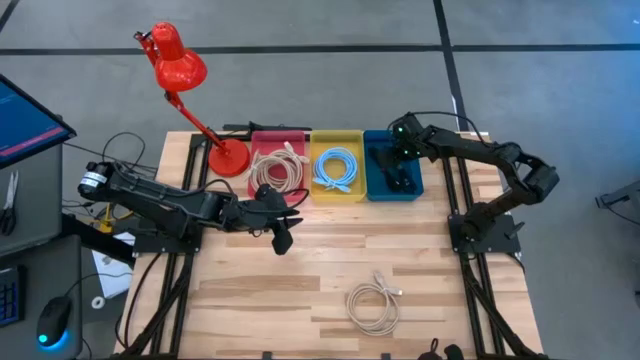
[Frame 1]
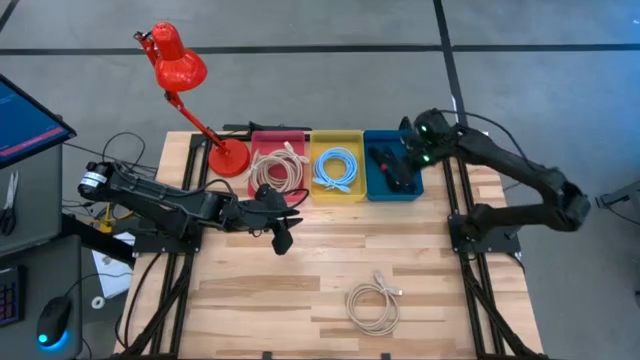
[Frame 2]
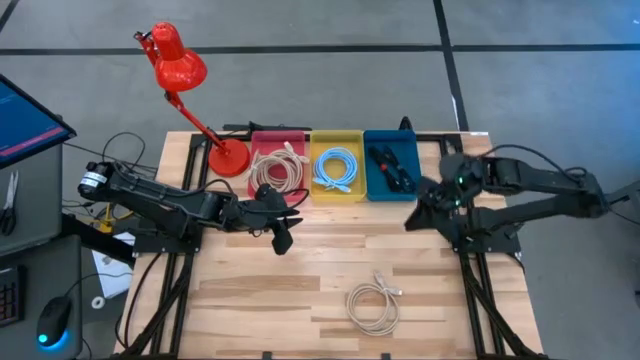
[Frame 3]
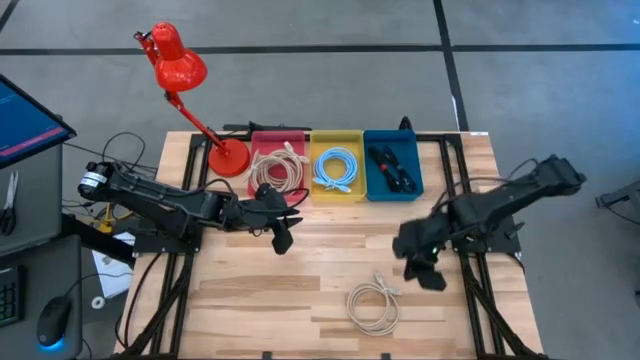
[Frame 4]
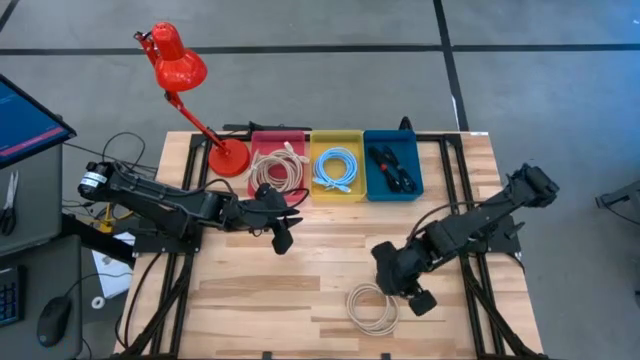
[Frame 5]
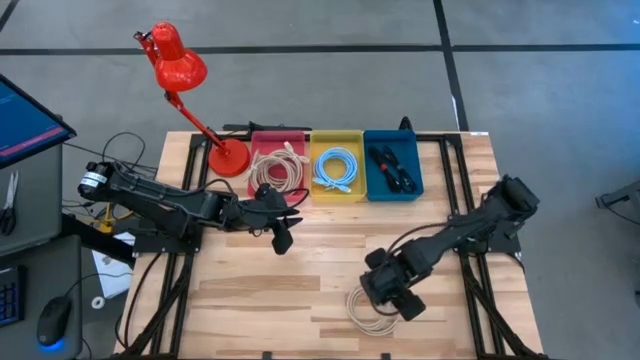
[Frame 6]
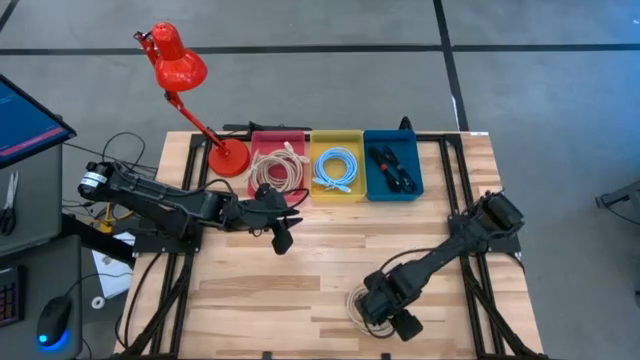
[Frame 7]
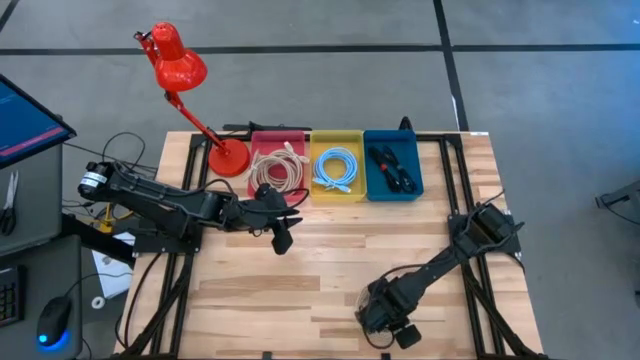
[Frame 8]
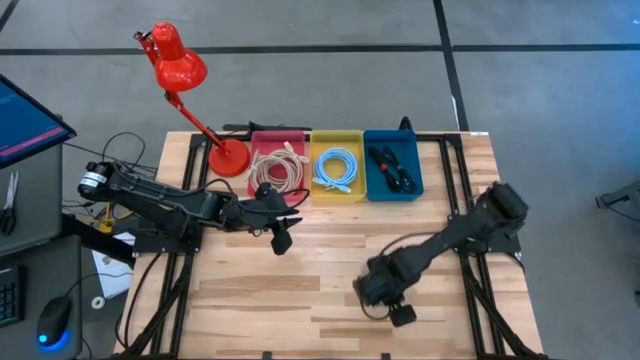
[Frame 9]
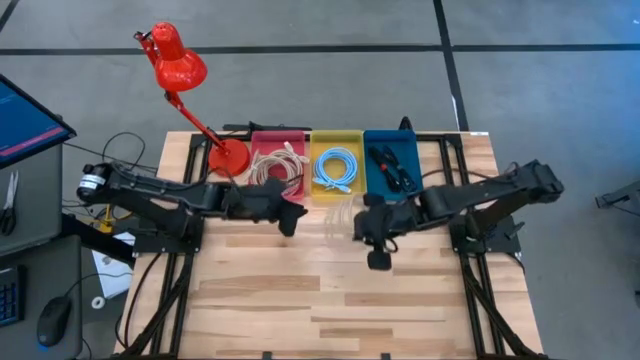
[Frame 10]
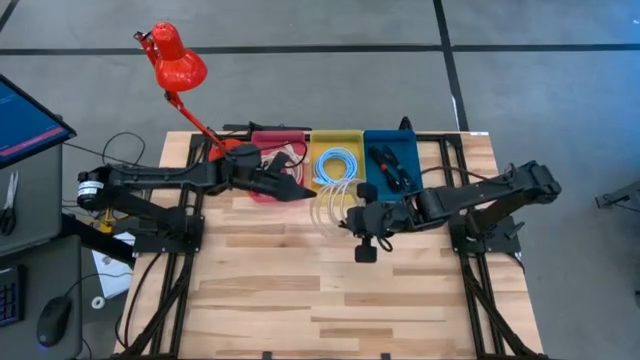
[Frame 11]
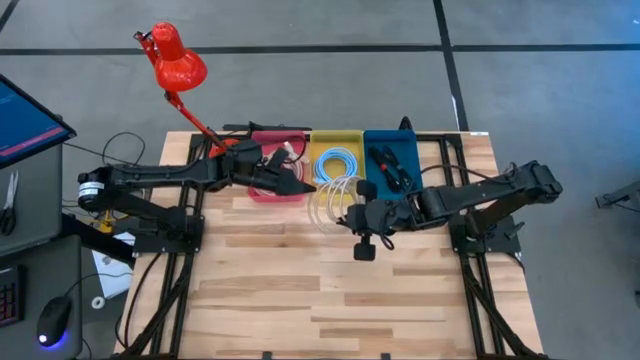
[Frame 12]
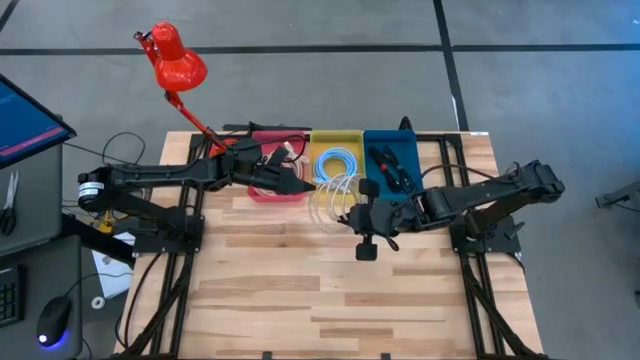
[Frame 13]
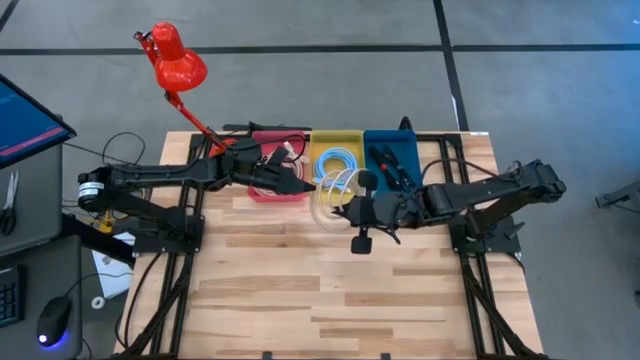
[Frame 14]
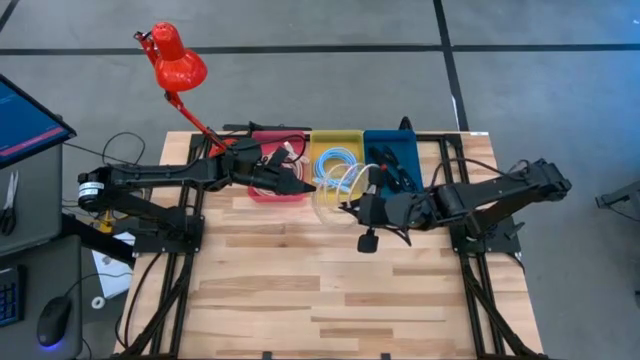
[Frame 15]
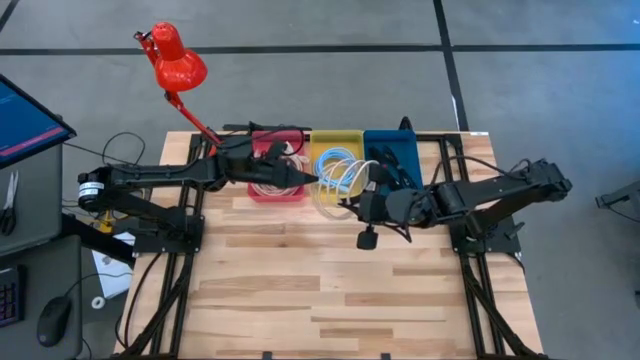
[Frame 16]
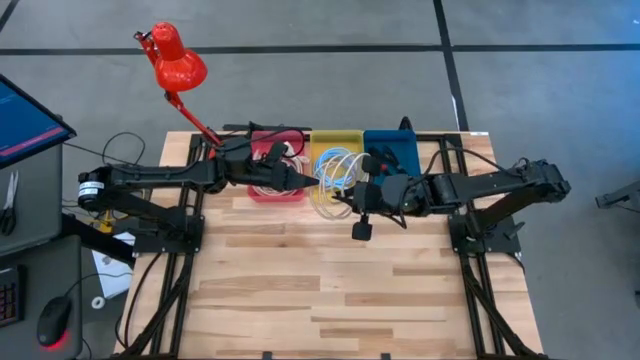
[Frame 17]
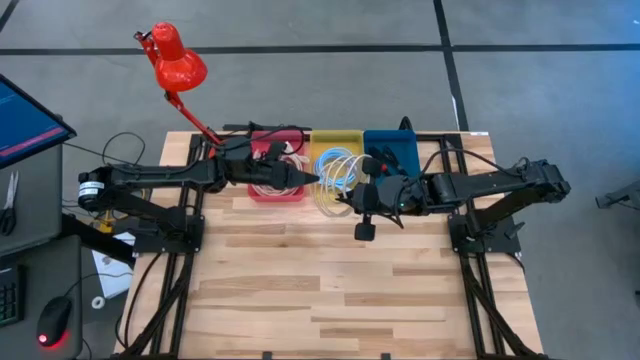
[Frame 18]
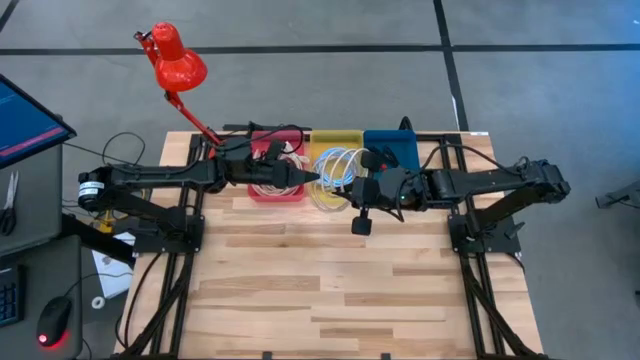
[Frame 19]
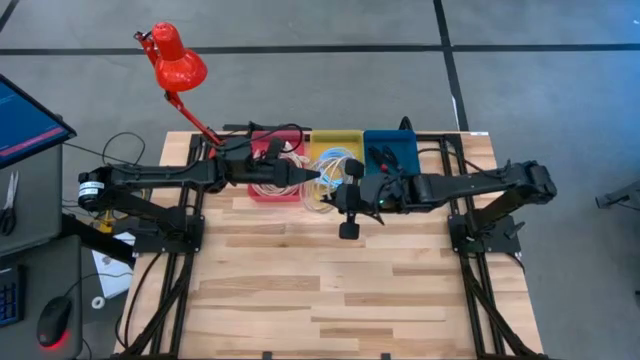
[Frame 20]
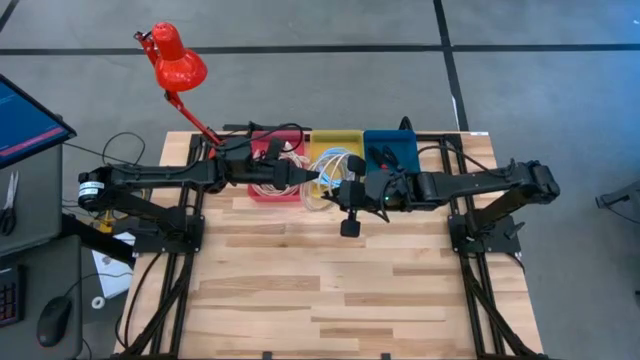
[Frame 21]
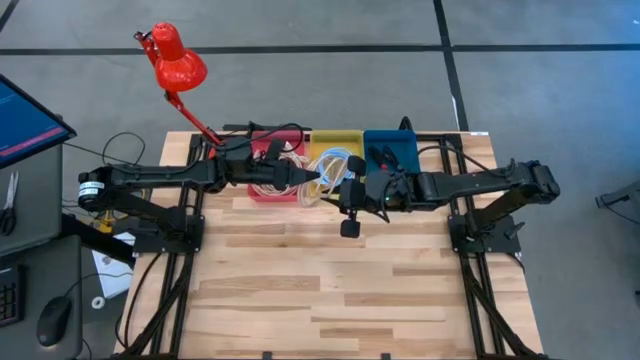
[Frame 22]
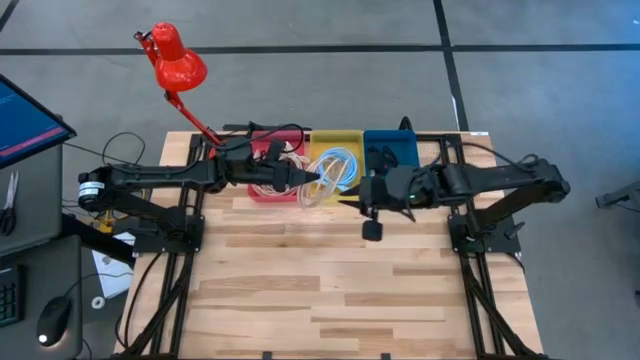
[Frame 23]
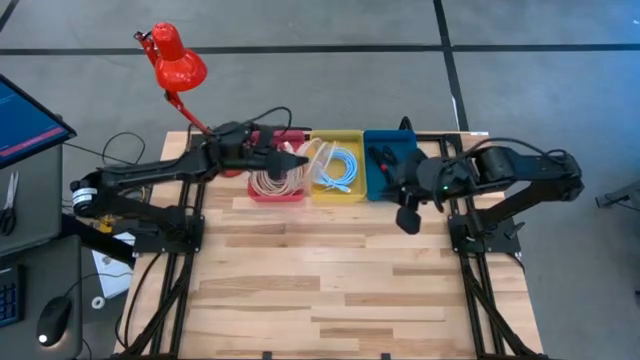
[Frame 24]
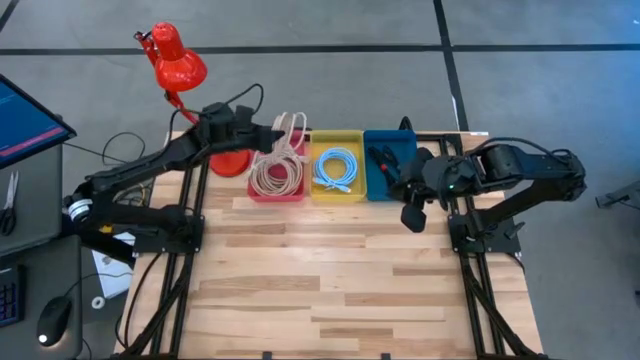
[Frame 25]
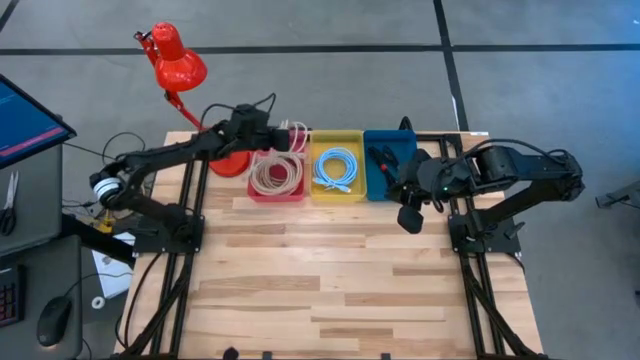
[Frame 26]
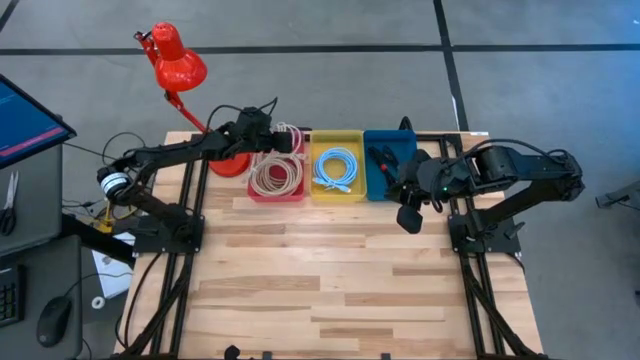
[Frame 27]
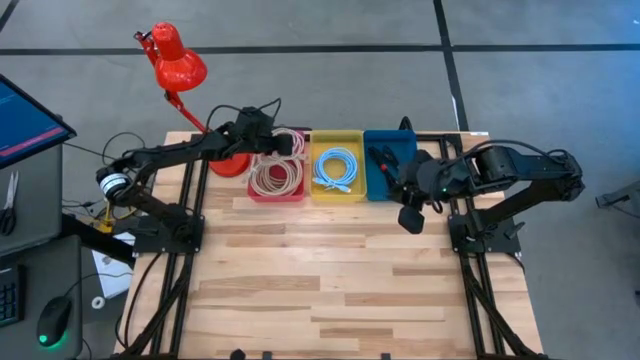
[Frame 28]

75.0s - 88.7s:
Task: Pick & Place USB Port
Put the bottom brown charger cable into the red bin

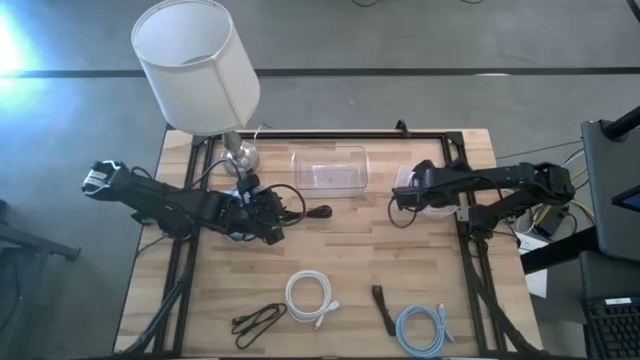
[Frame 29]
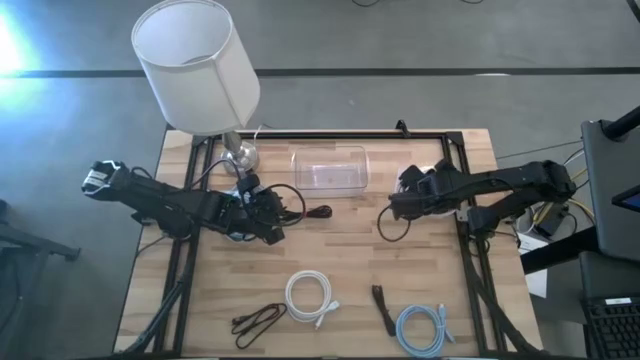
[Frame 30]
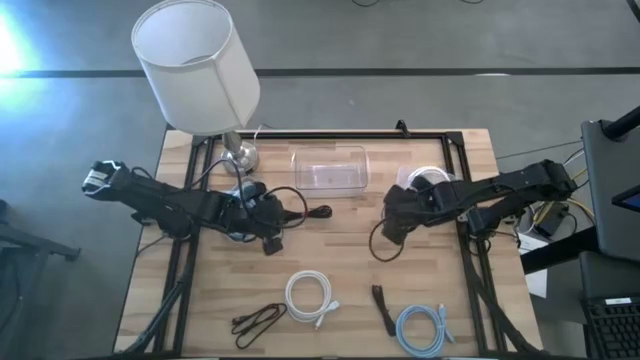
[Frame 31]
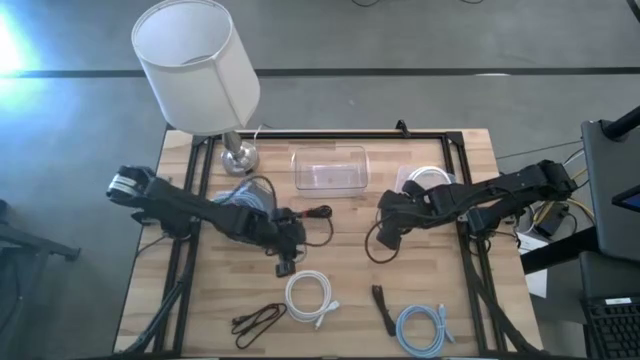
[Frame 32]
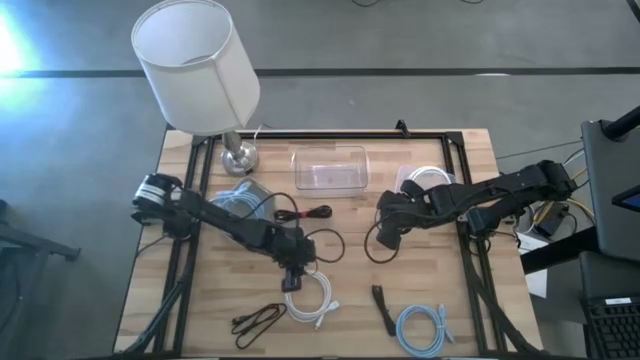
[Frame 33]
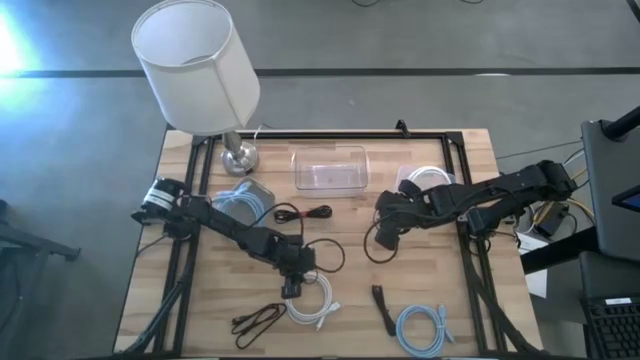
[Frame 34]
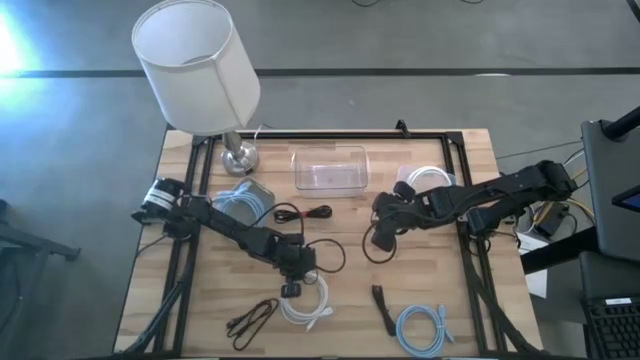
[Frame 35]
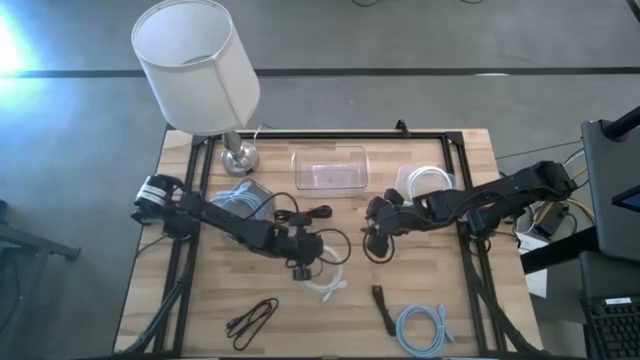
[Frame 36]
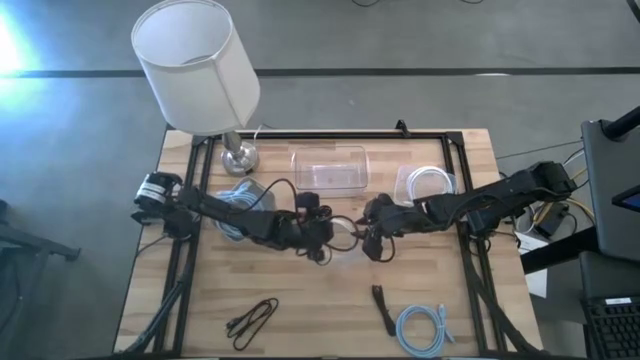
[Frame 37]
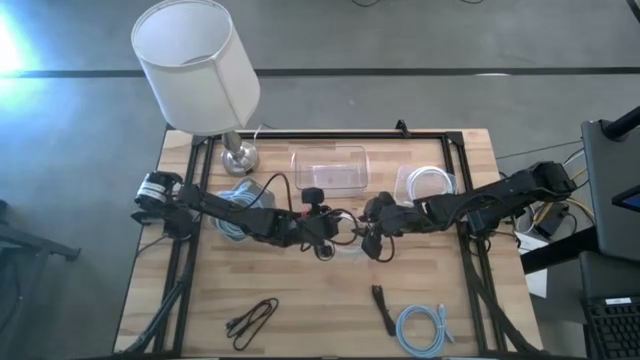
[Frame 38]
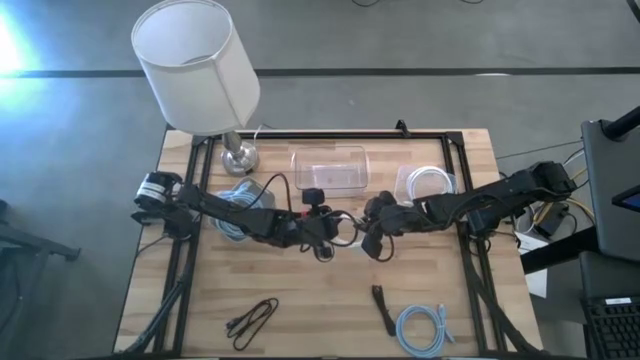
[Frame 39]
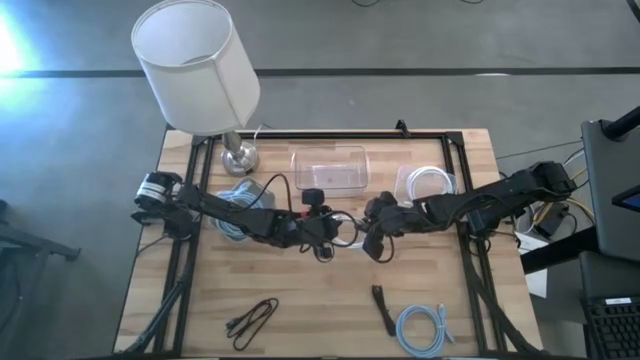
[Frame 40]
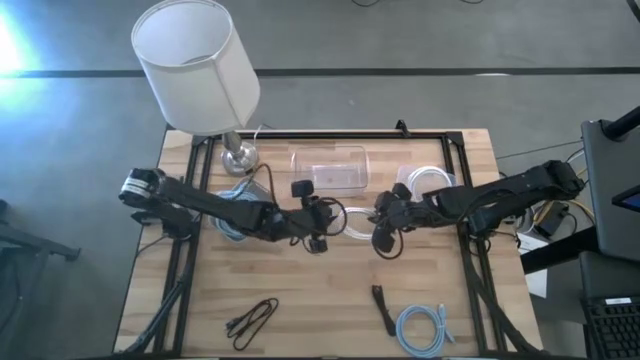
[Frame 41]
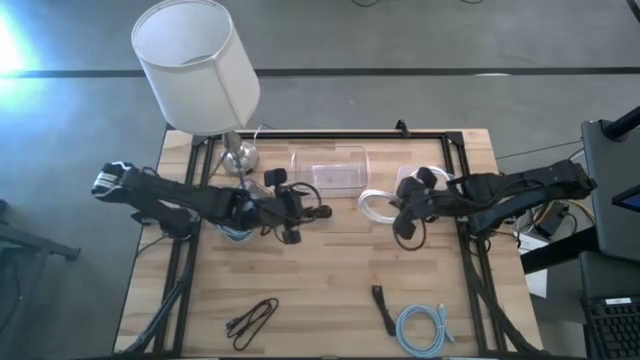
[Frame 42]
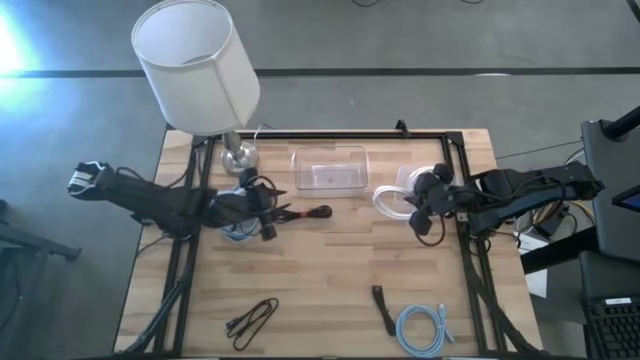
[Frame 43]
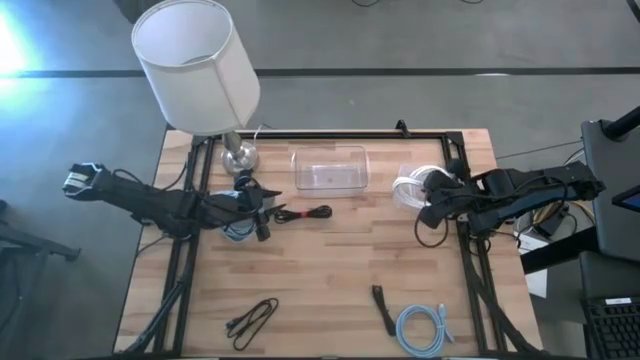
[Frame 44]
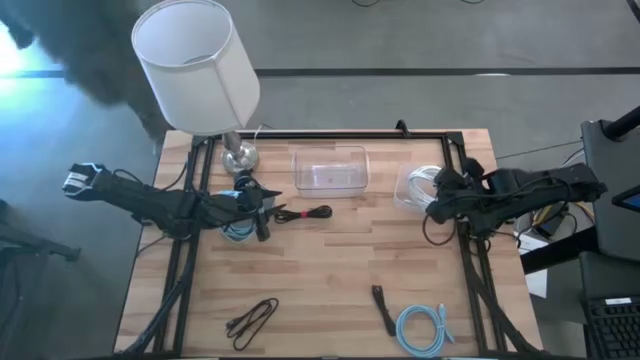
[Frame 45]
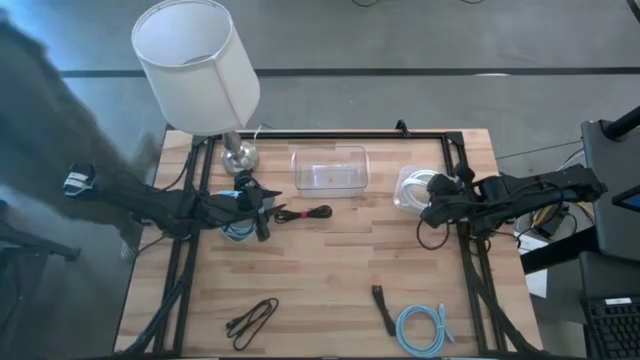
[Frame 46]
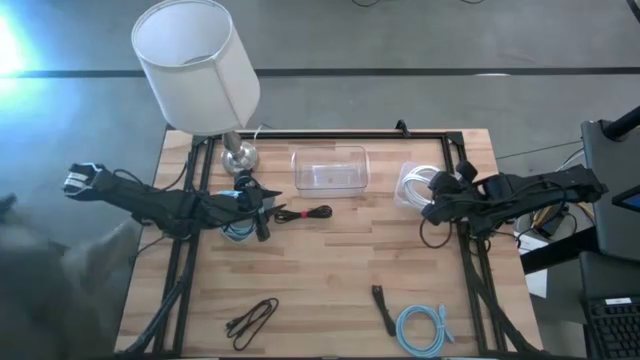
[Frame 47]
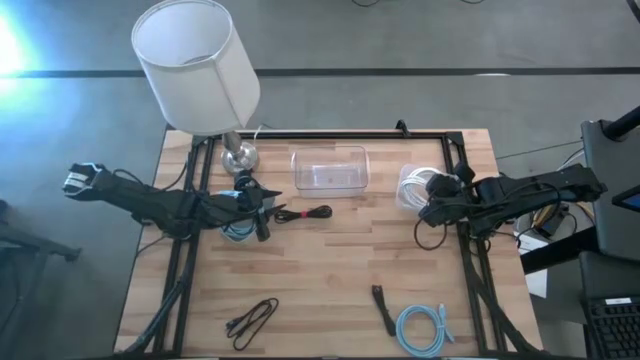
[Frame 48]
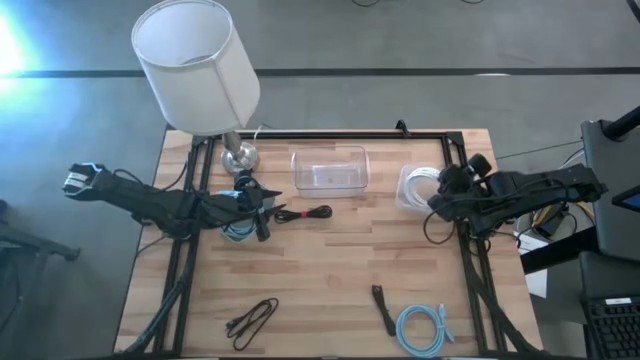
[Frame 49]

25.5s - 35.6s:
Task: Pick & Place USB Port
Put the white USB cable into the right transparent bin
